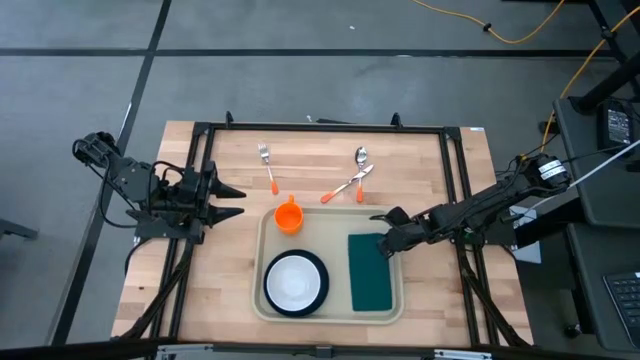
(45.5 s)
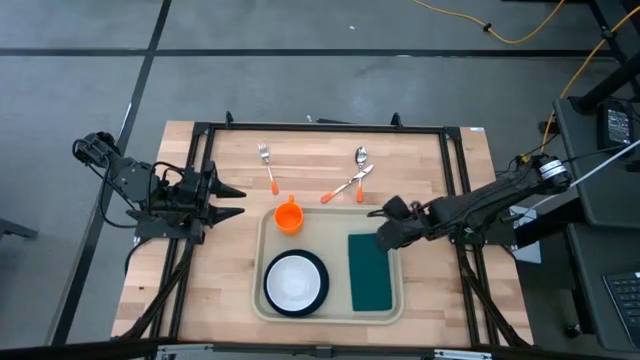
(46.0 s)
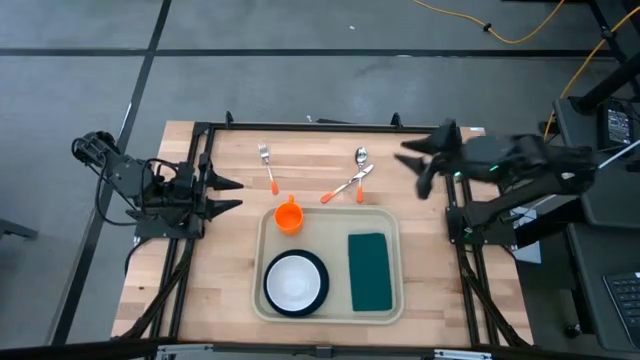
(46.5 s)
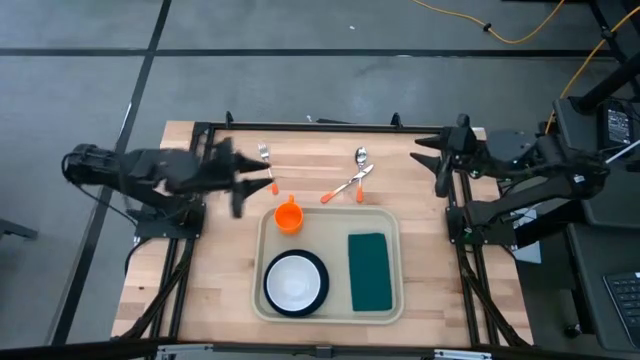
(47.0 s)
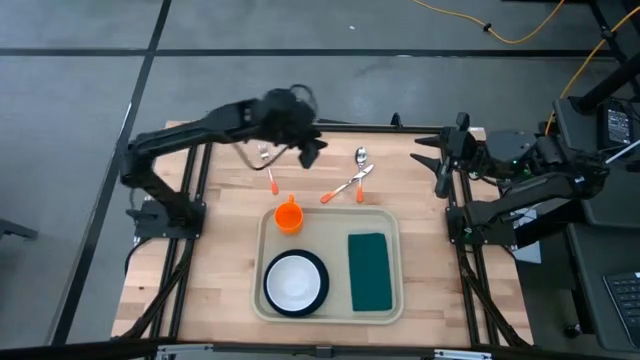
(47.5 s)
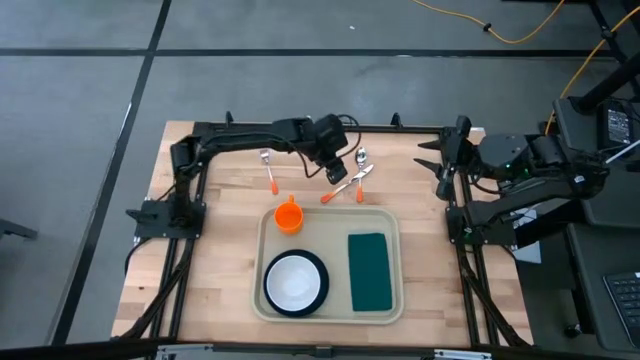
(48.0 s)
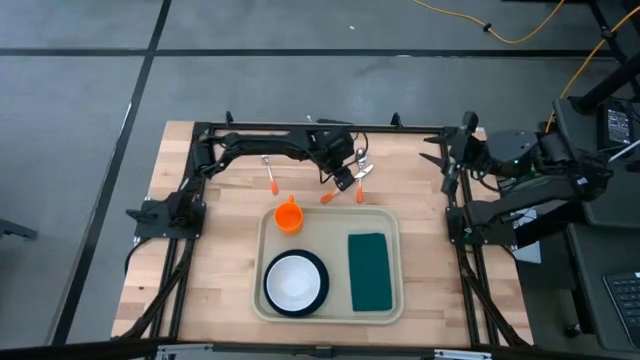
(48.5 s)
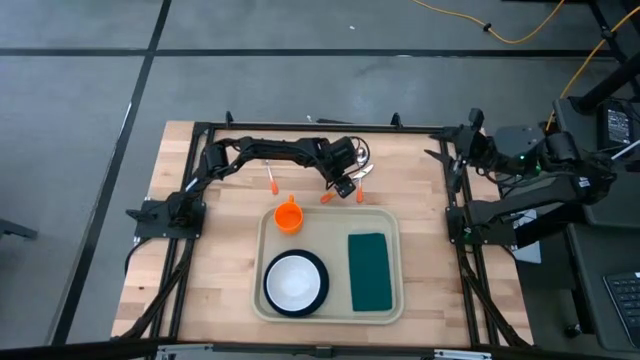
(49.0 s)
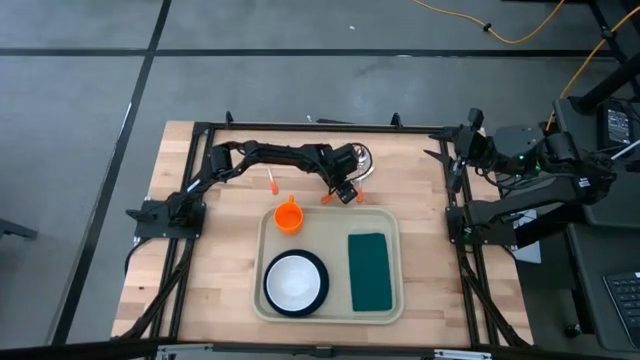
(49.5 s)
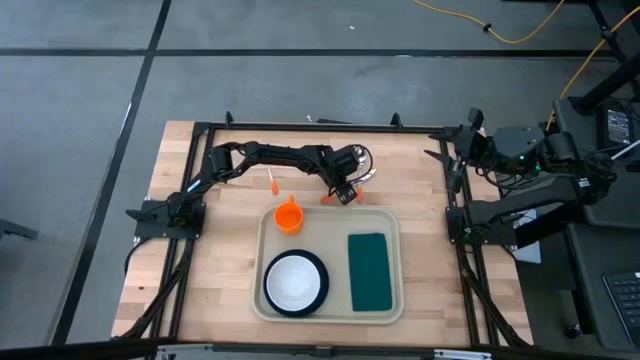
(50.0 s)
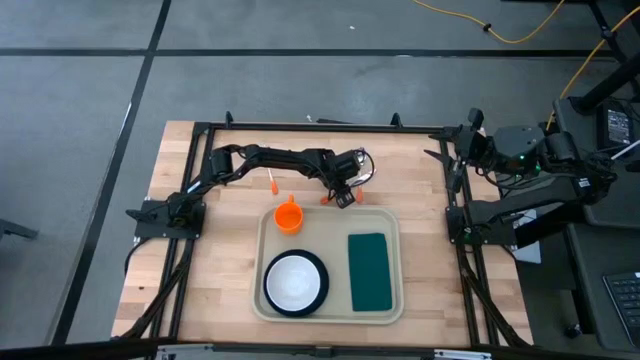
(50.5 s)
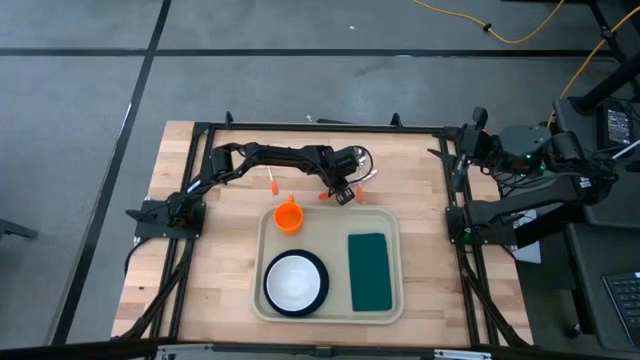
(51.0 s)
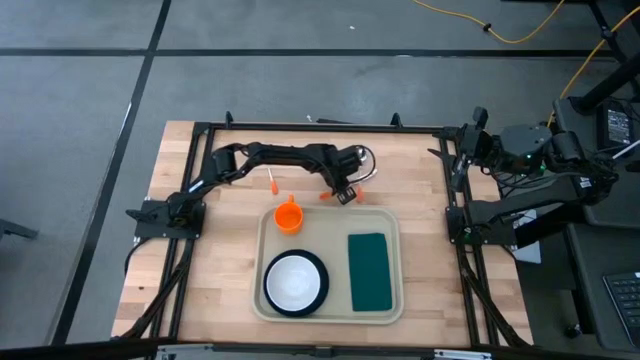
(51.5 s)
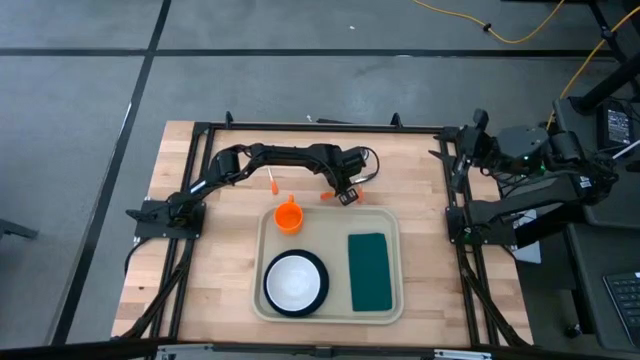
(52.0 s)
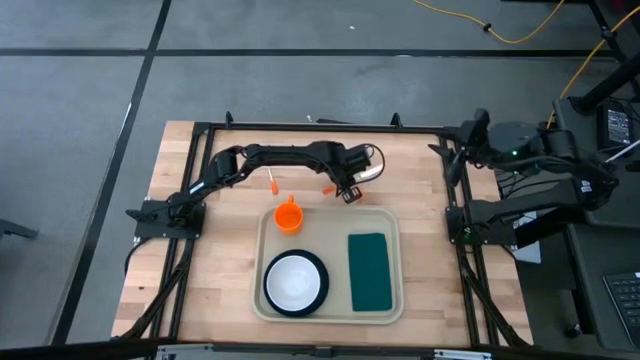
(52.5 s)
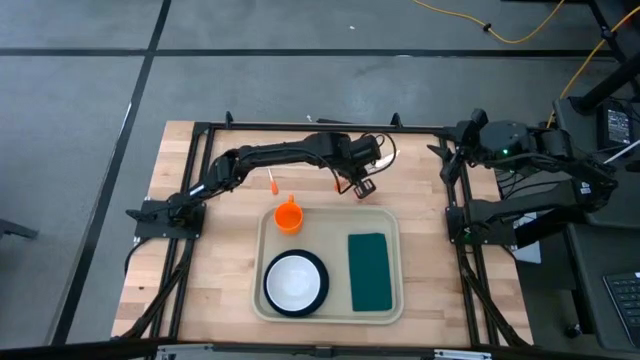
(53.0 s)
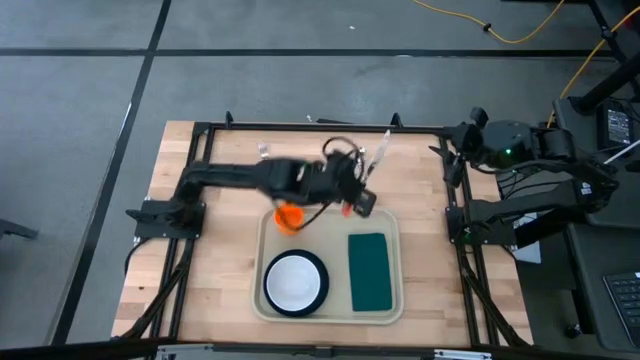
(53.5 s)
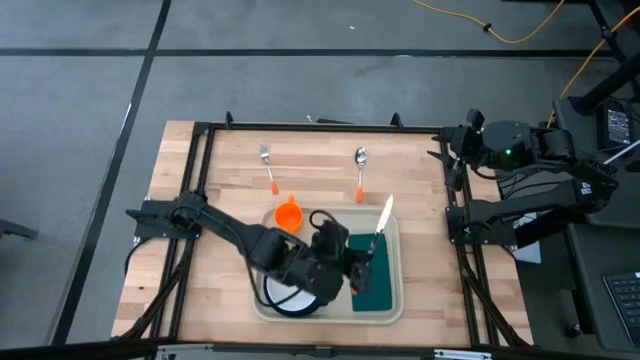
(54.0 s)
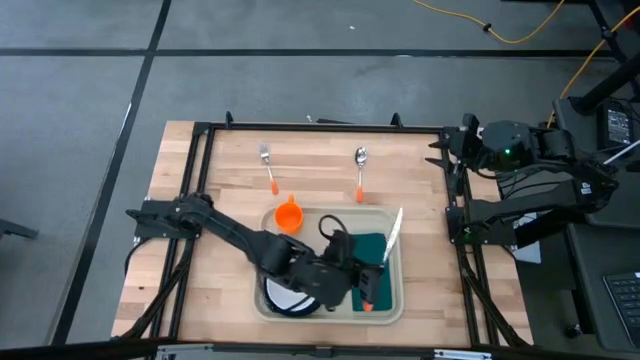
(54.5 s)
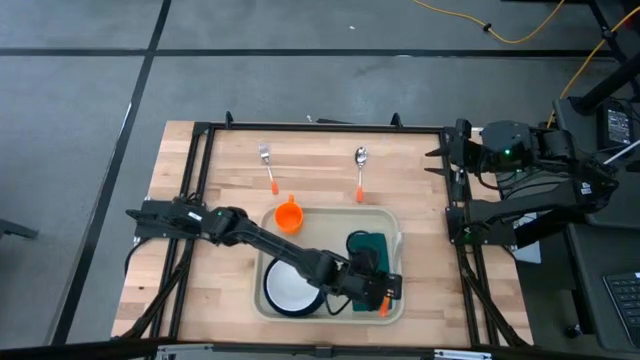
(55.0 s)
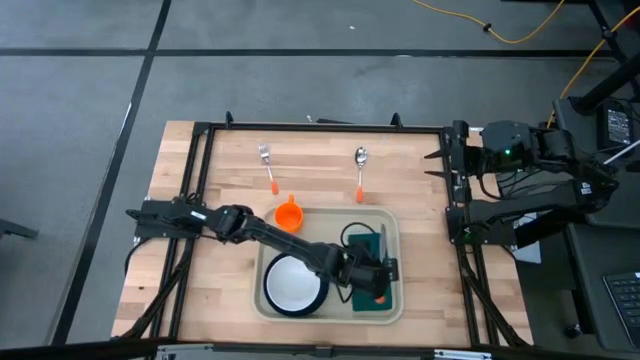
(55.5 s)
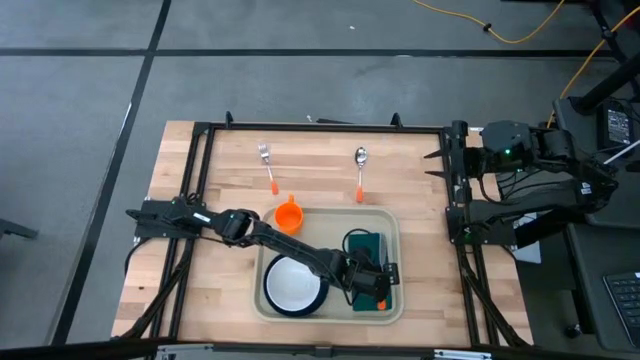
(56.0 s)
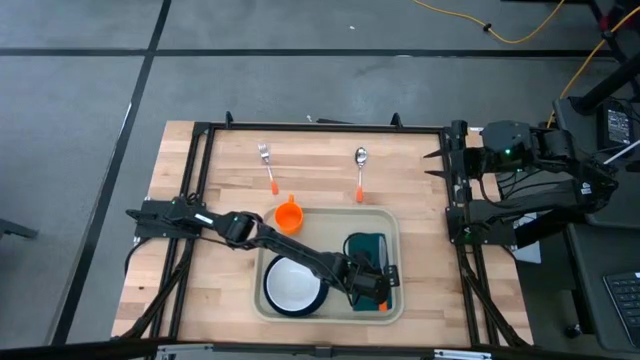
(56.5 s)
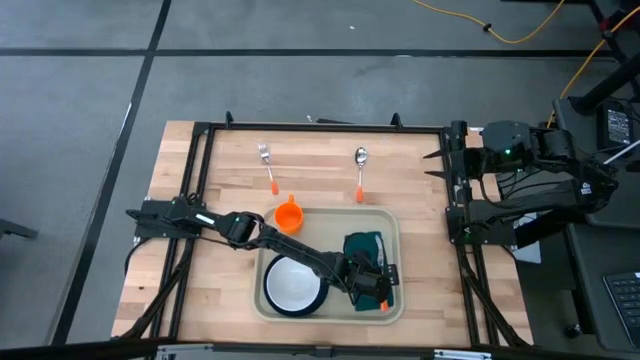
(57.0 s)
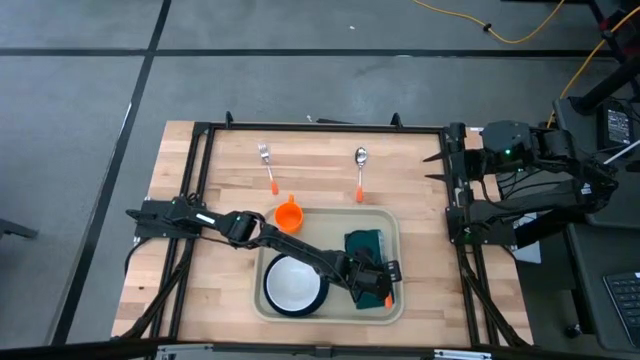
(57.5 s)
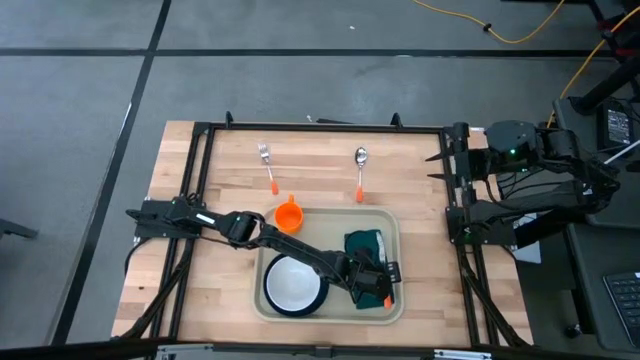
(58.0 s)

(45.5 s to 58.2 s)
Task: Set up tray
Put the orange table knife on top of the green table napkin

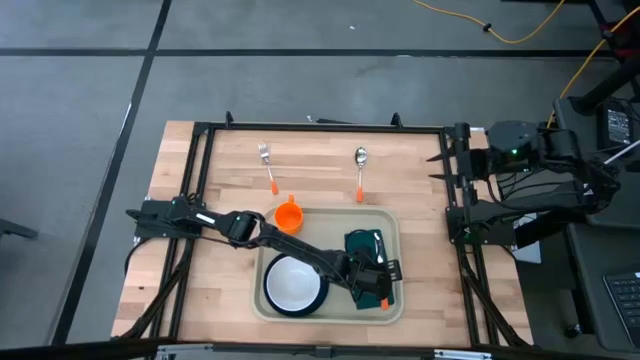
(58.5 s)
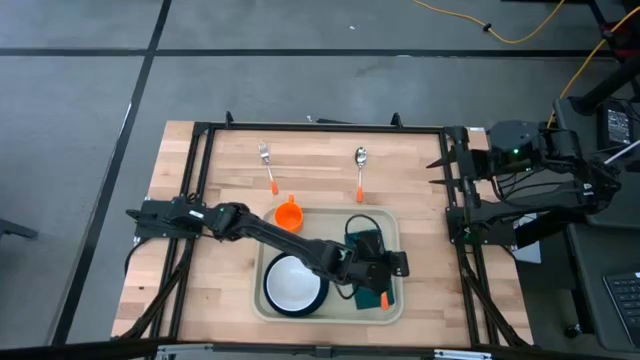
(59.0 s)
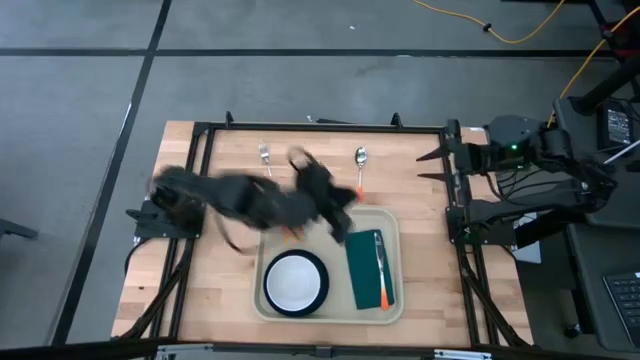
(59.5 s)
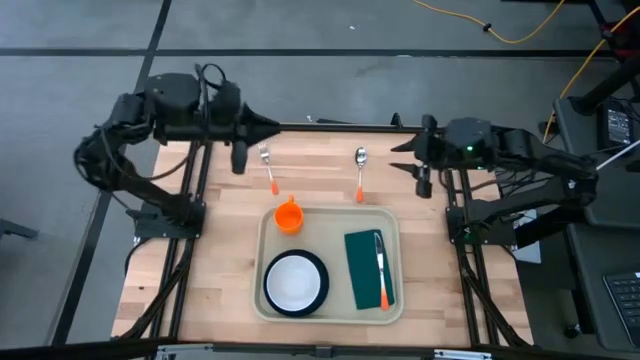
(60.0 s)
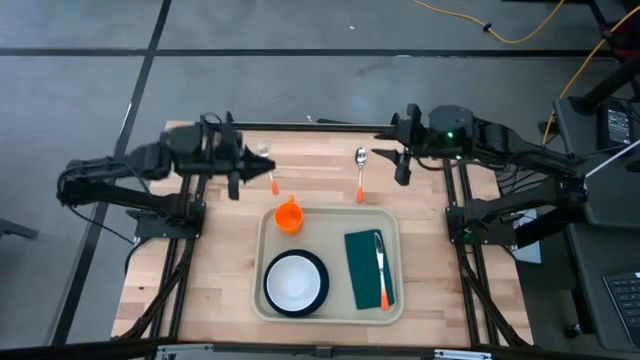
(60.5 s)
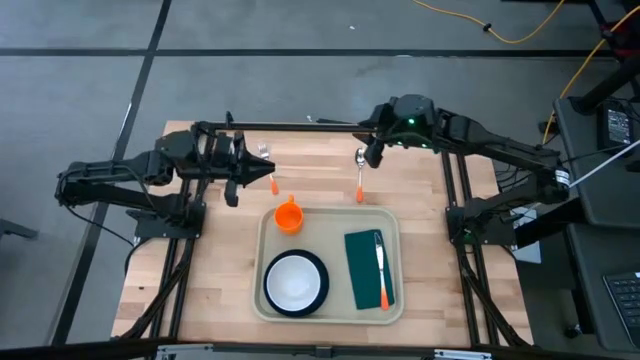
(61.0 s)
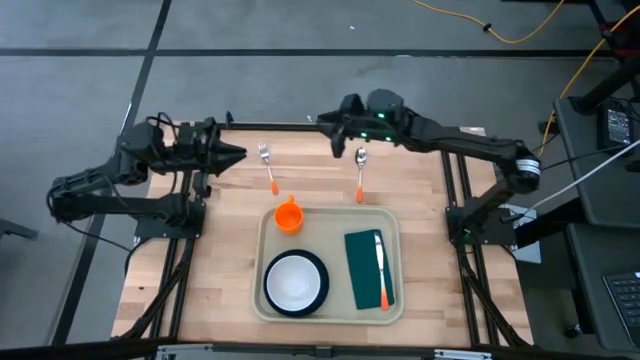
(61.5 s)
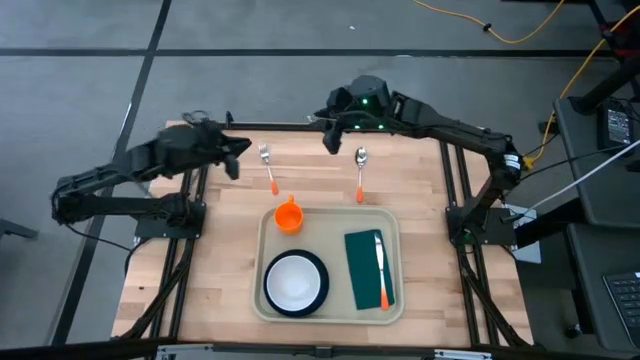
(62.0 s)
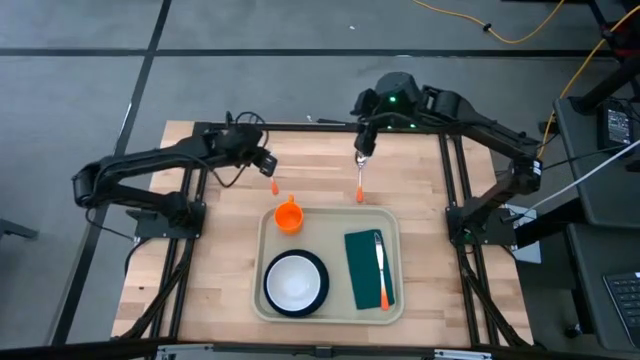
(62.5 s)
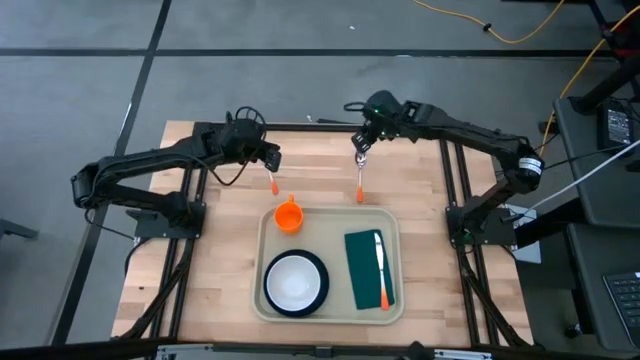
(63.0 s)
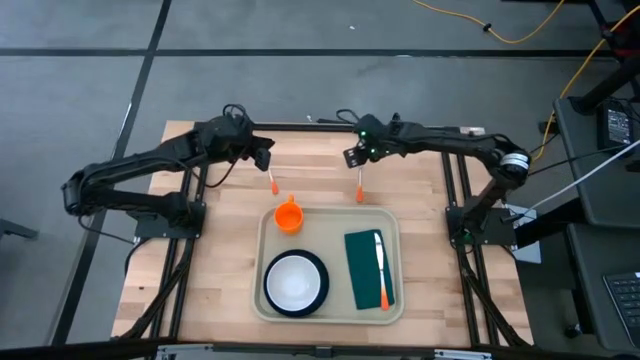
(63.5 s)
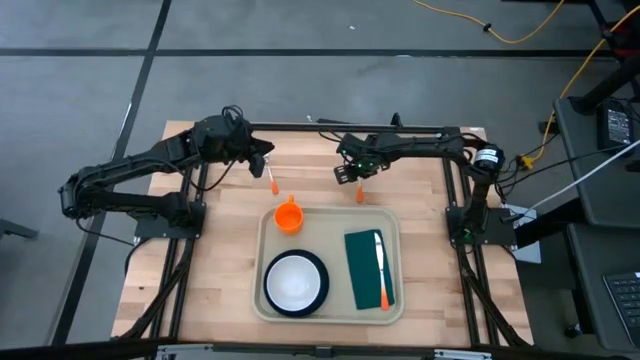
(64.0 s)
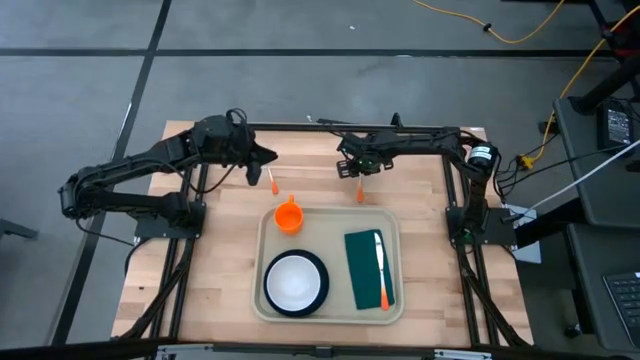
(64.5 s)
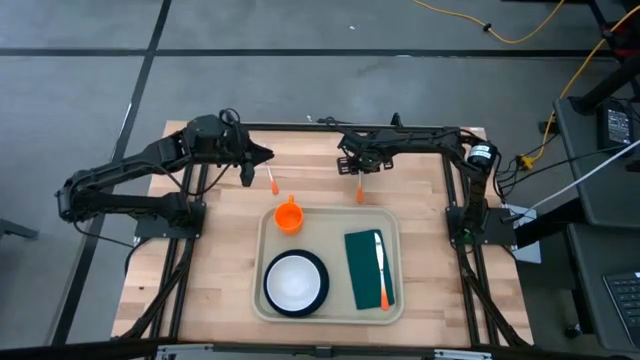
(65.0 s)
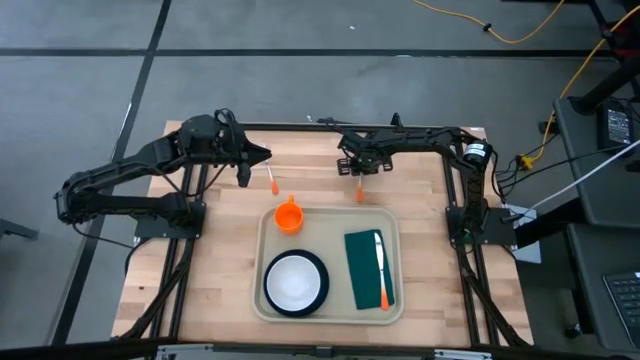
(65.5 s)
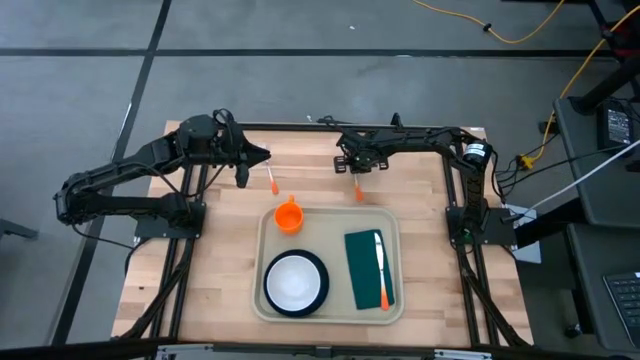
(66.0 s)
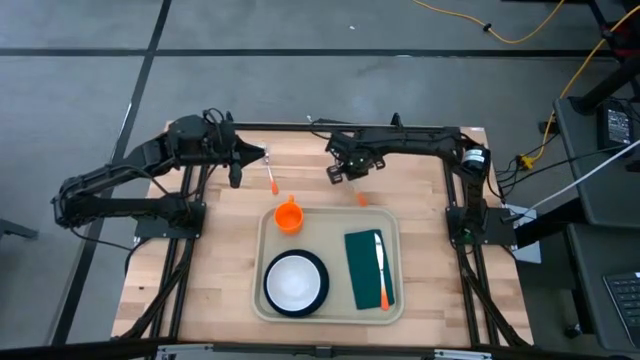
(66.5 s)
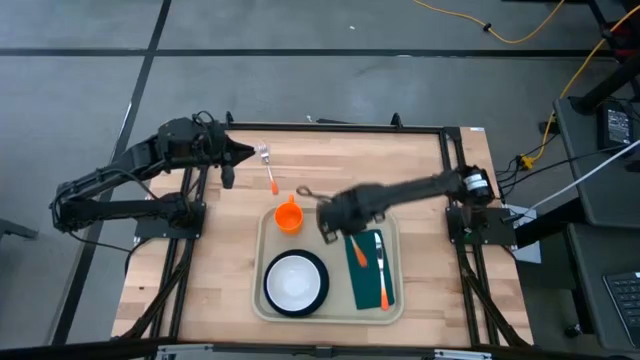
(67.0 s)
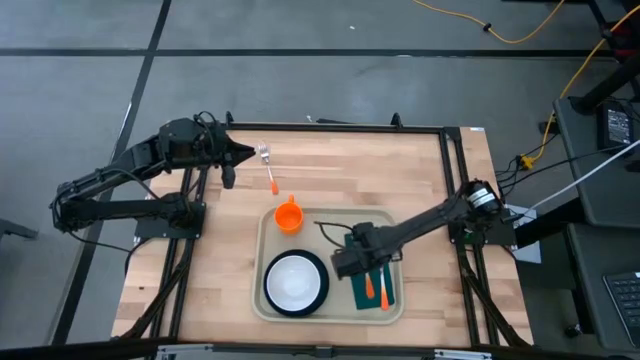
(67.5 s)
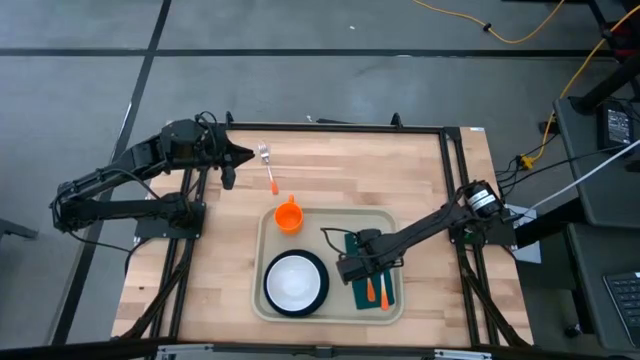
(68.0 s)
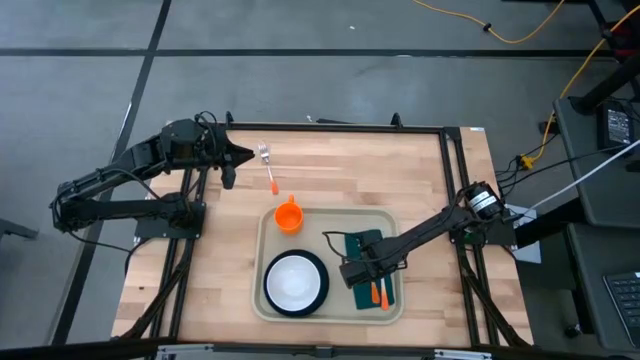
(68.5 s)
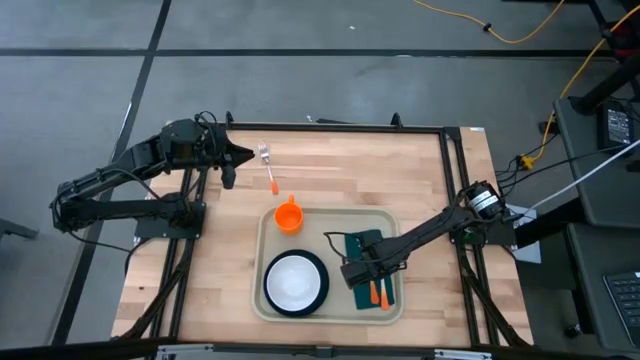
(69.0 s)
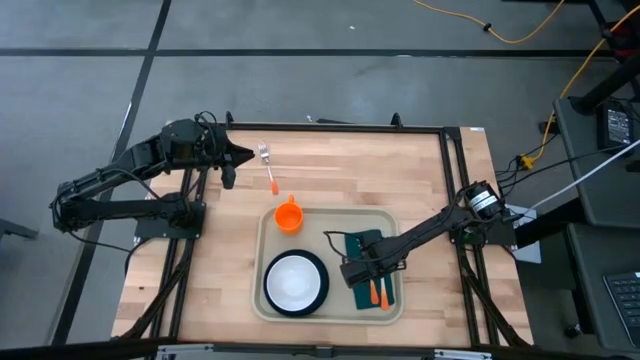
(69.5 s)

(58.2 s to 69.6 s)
Put the orange spoon on top of the green table napkin to the left of the orange table knife
